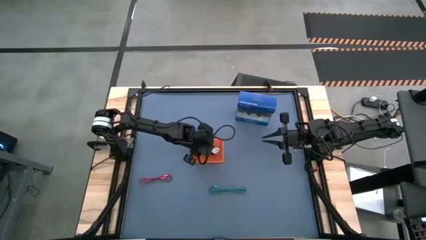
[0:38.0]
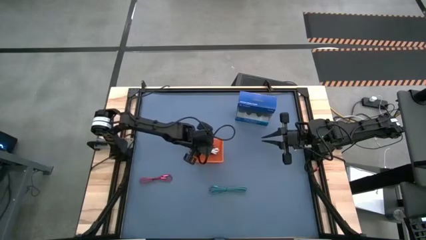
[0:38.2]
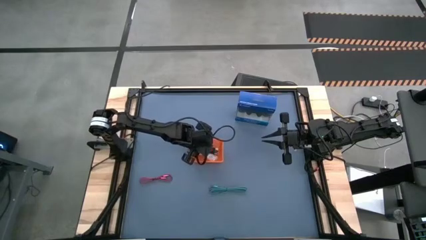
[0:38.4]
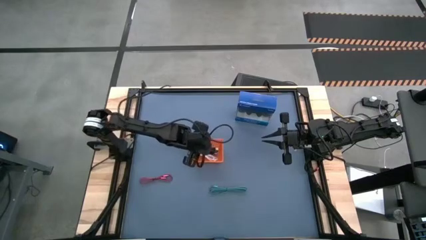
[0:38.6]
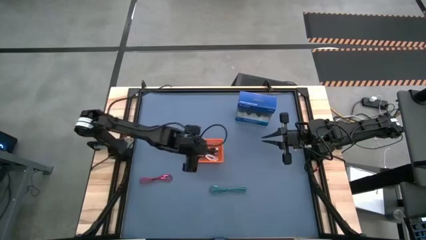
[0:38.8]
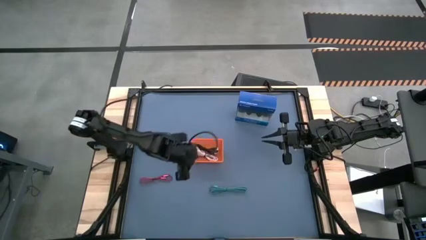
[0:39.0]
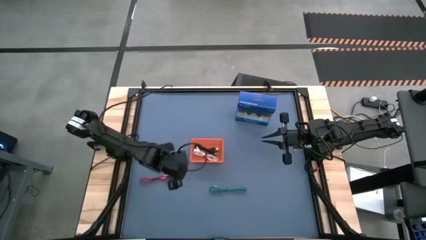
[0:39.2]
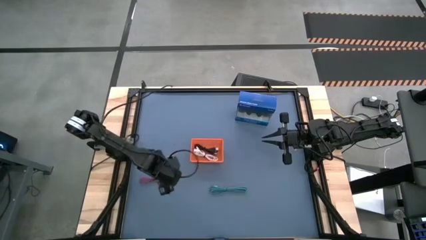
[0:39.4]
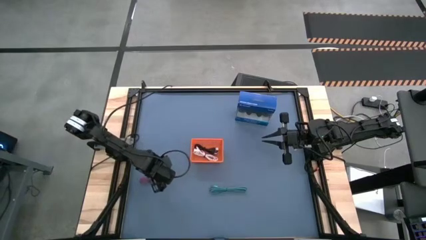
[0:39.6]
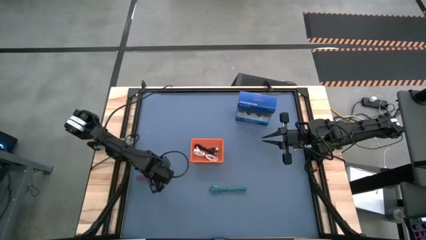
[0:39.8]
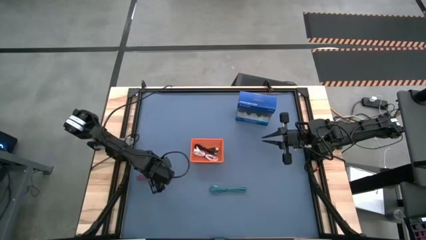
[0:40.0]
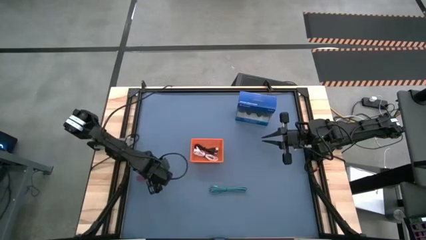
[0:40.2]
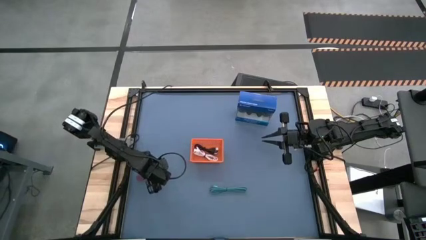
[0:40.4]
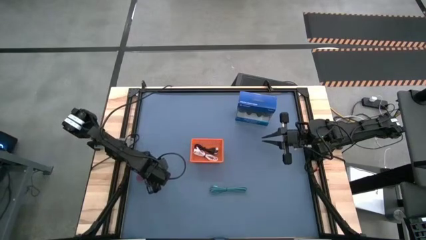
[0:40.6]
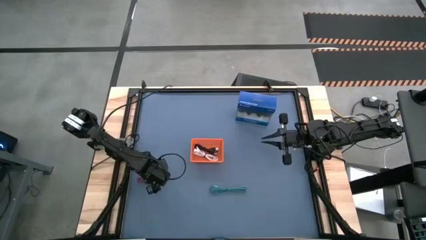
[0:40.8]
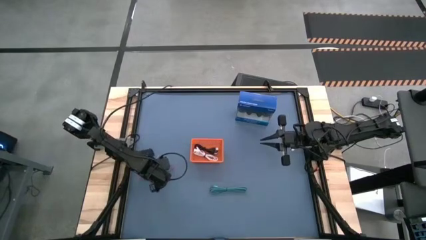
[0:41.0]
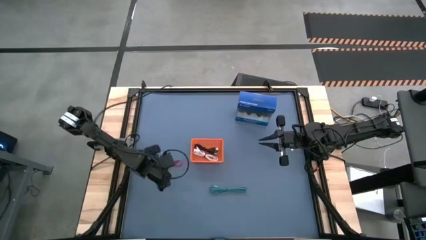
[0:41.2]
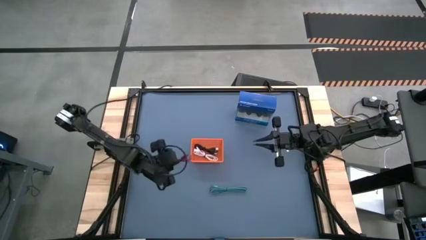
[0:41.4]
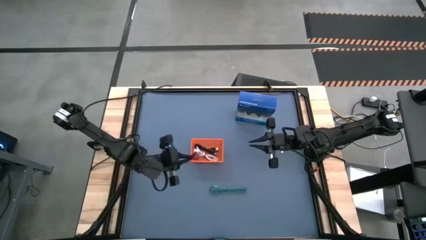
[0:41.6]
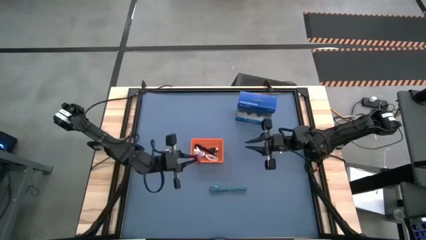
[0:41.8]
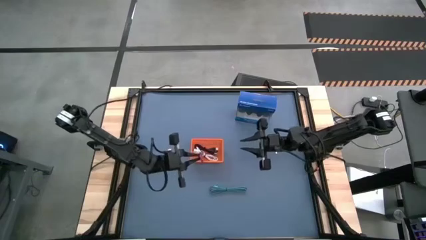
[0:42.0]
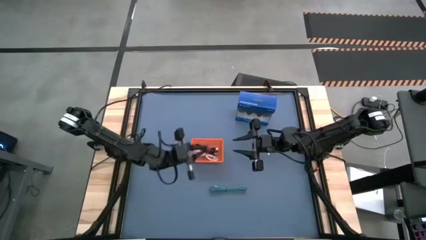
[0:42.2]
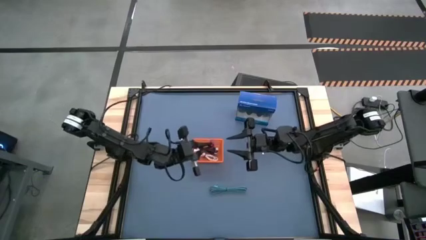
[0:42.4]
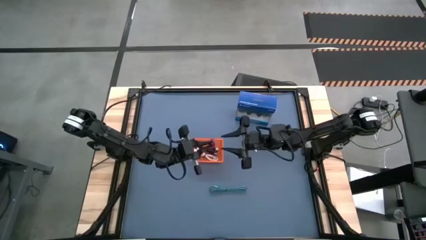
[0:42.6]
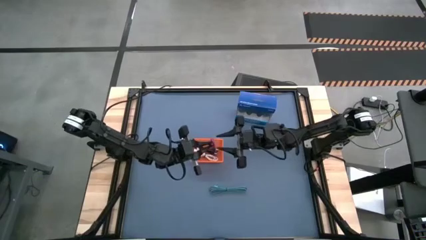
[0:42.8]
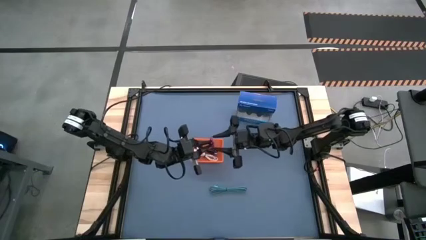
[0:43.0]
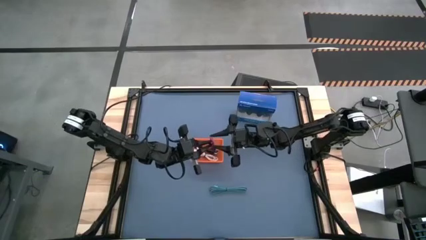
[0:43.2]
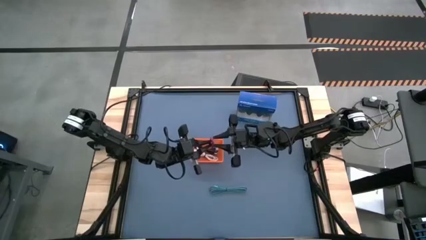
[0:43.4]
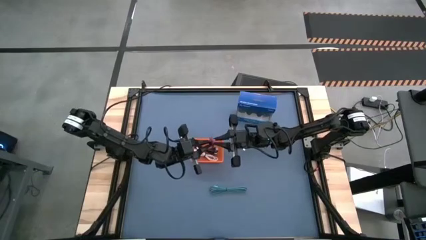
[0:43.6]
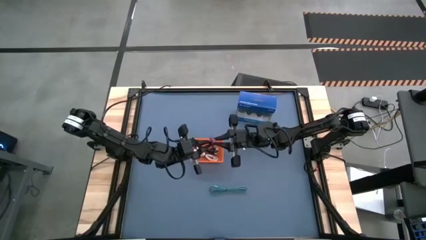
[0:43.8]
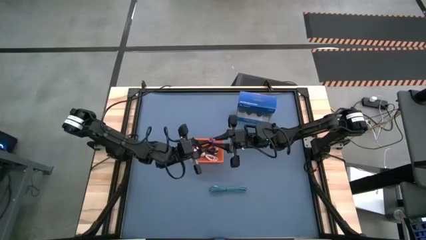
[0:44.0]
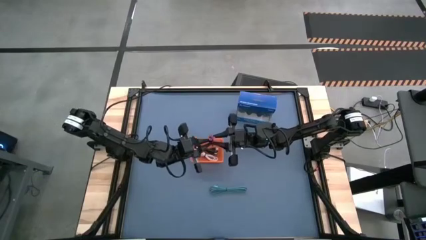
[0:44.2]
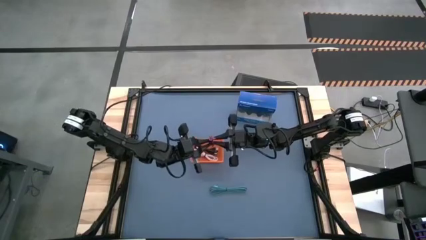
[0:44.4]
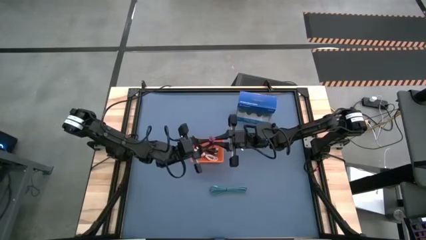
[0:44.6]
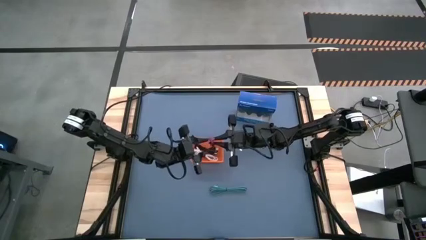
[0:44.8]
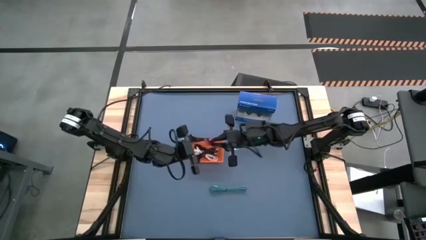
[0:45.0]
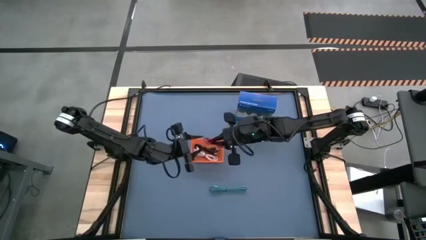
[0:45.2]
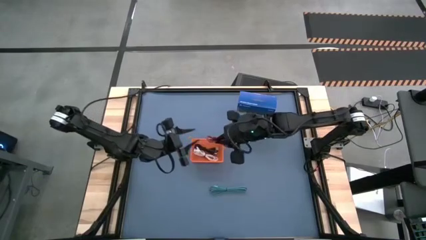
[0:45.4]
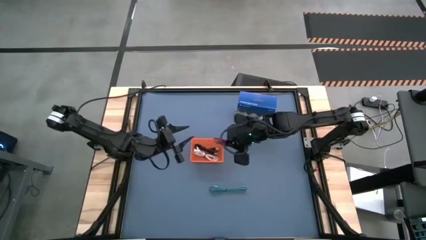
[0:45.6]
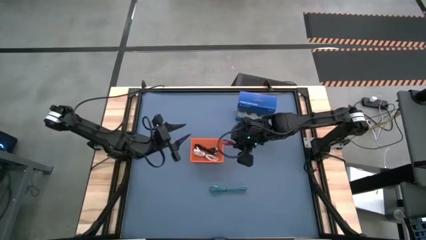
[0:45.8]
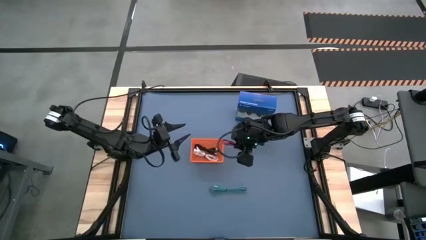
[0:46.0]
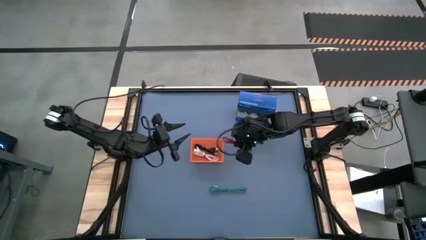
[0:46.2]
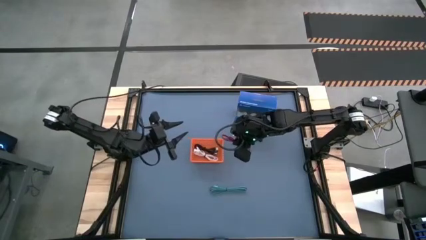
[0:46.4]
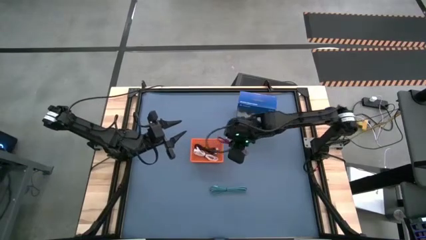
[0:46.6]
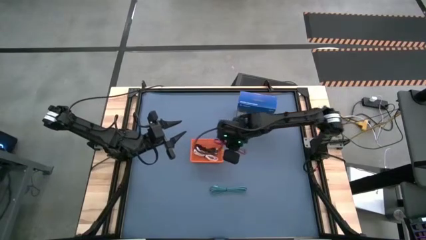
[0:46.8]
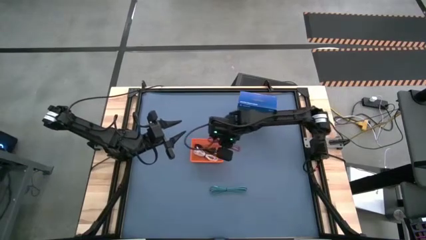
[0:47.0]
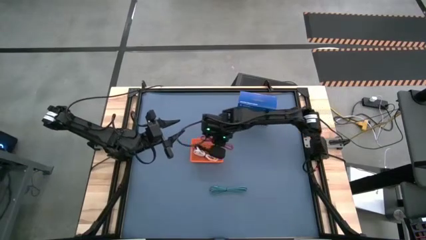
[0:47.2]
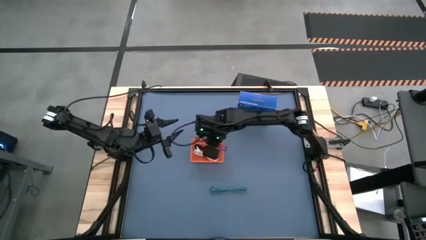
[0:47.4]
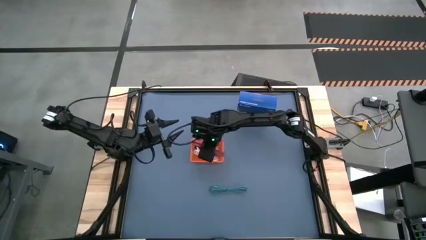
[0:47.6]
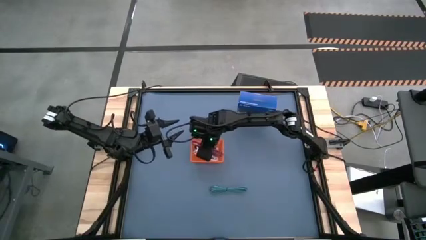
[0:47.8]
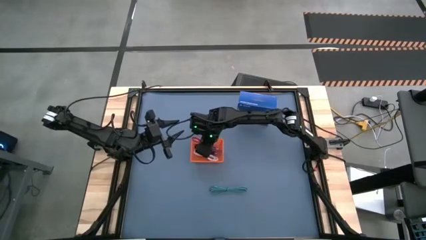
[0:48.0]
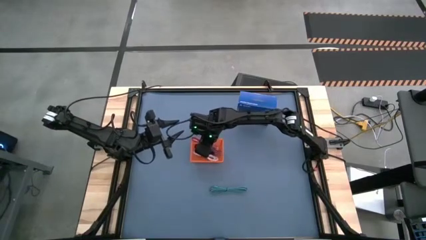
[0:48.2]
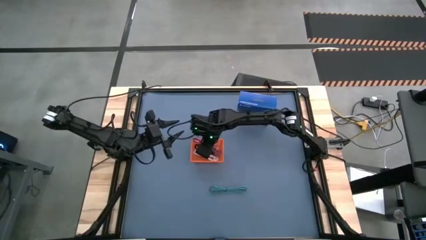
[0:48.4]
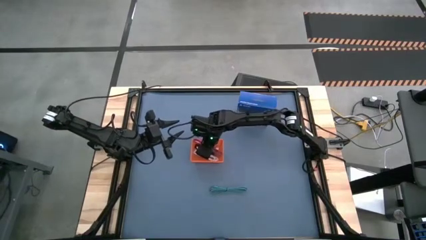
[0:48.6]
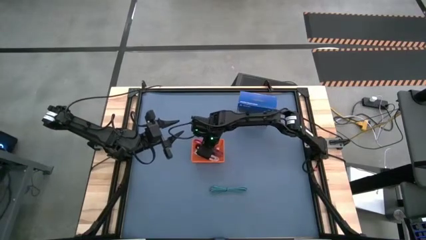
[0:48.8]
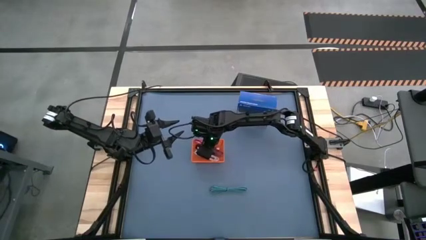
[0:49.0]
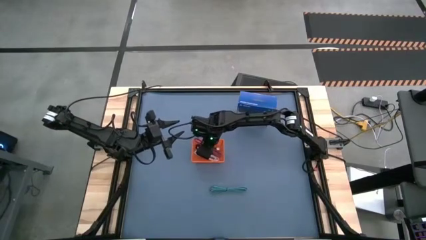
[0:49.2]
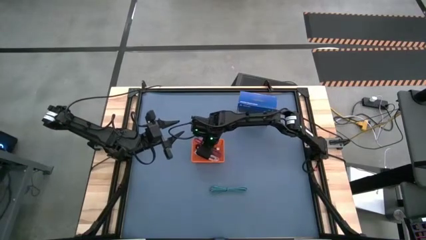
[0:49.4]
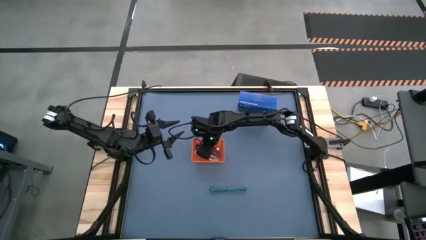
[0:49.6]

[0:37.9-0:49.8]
Task: Pick and place USB-C Cables
Put the pink charger cable into the orange bin

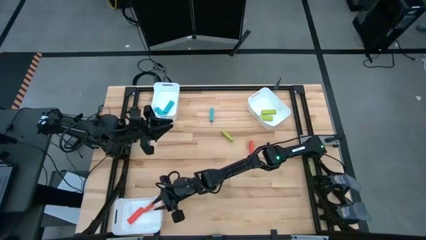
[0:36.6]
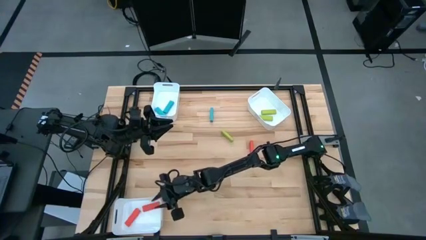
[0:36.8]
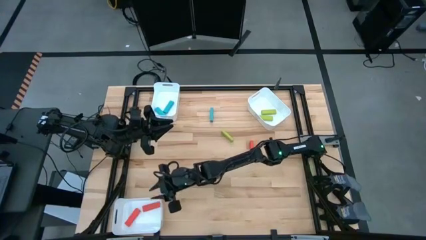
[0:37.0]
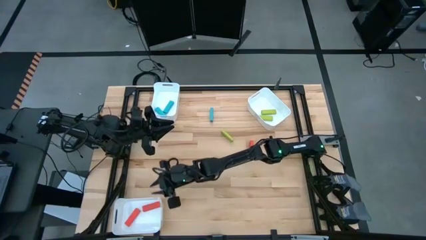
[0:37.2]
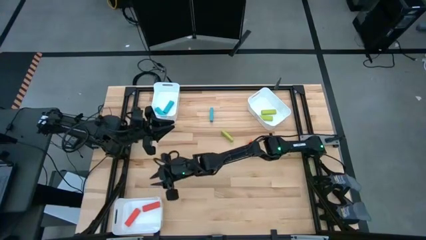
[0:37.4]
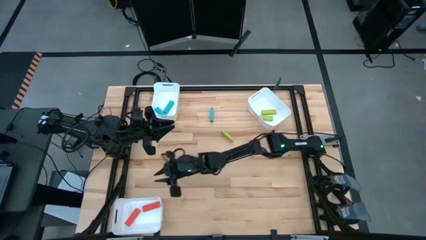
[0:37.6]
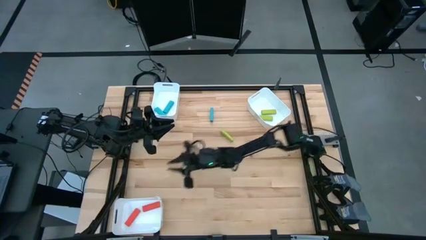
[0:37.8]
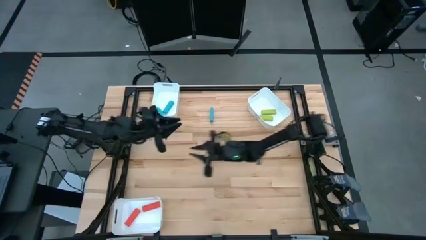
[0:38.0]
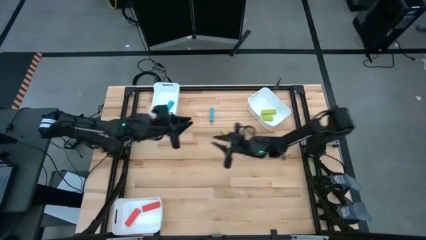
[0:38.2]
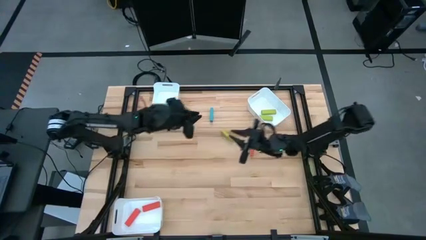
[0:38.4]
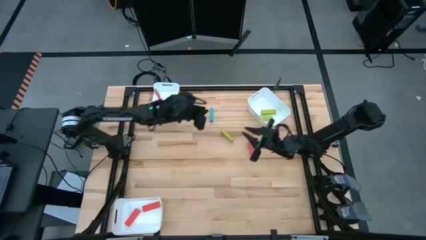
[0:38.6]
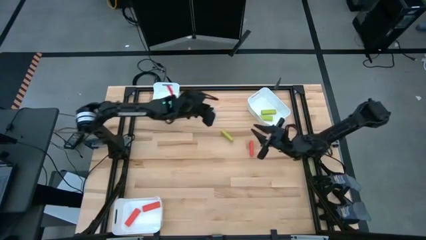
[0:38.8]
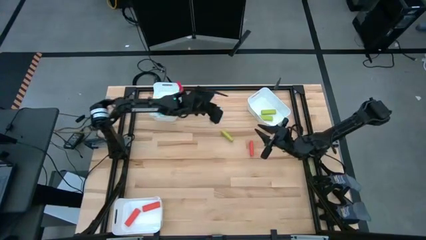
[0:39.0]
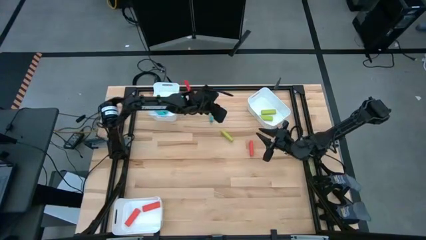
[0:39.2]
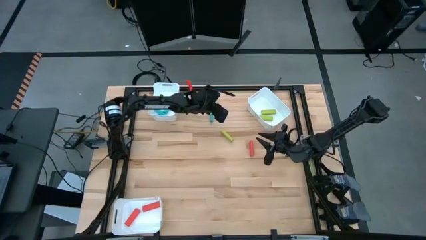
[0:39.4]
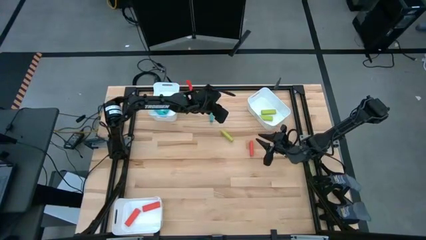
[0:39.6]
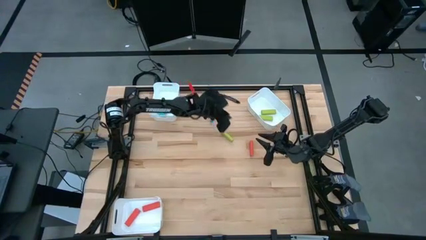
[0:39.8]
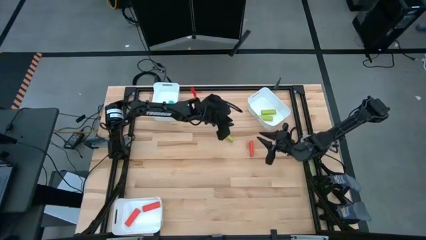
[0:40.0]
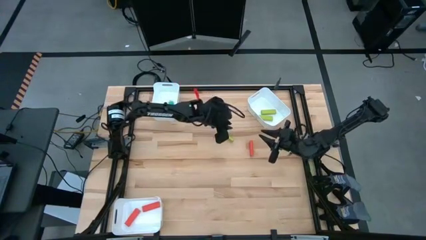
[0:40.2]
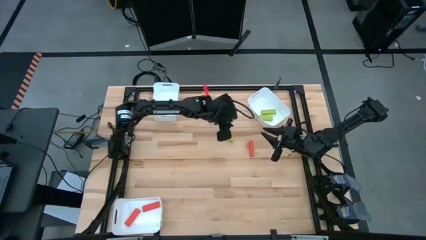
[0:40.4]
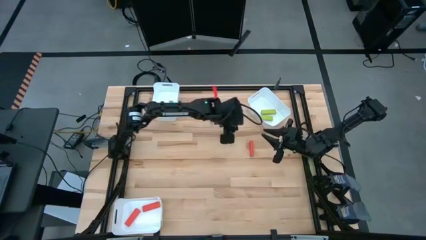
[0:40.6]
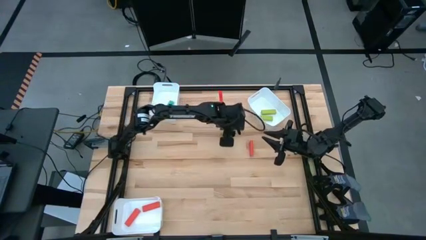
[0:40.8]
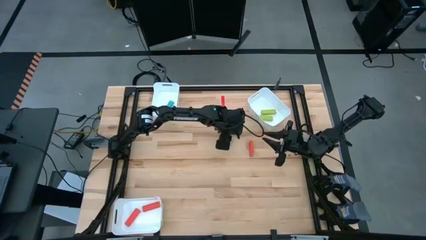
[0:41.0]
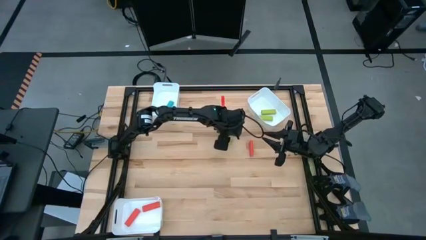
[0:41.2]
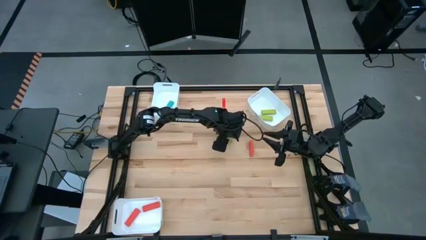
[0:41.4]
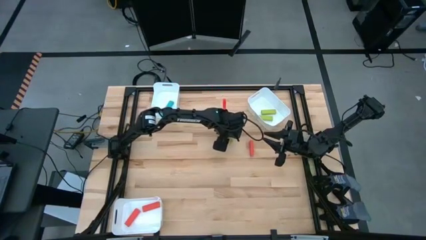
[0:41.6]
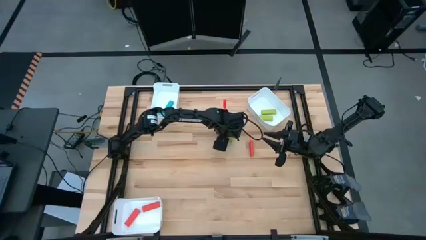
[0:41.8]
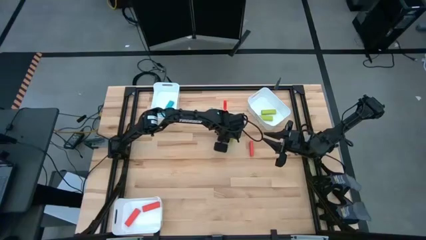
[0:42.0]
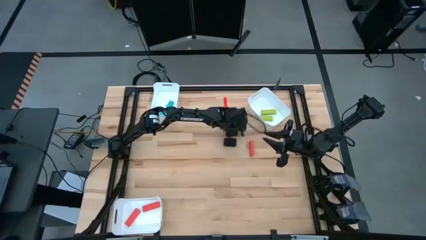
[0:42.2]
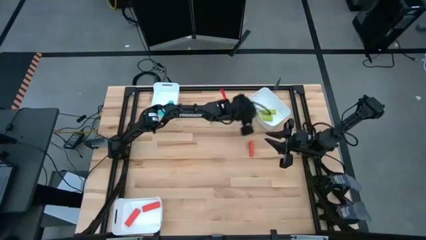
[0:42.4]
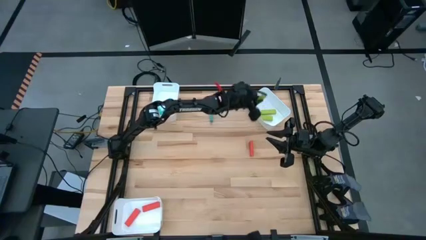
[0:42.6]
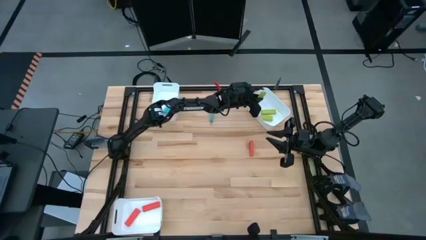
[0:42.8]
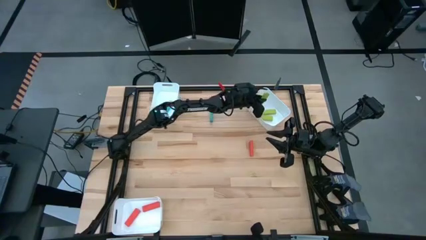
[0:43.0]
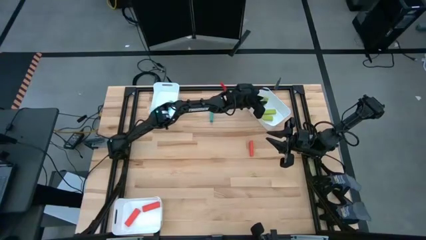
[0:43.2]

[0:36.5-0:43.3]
Task: Sort blocks
Put the green block into the top right white bin
